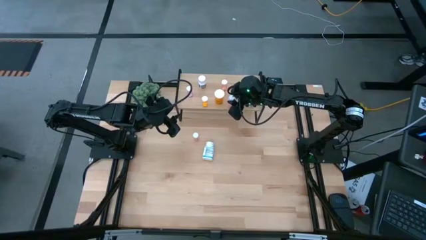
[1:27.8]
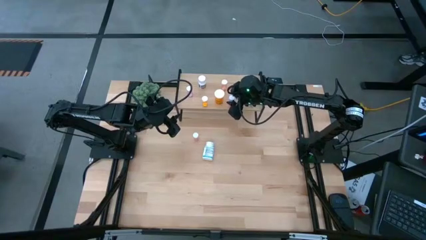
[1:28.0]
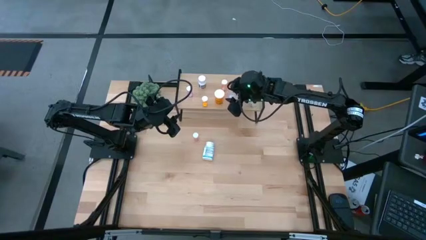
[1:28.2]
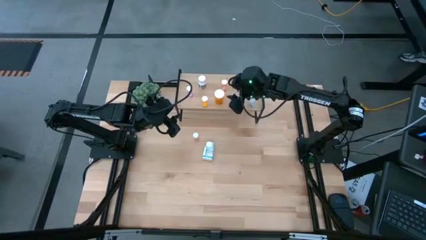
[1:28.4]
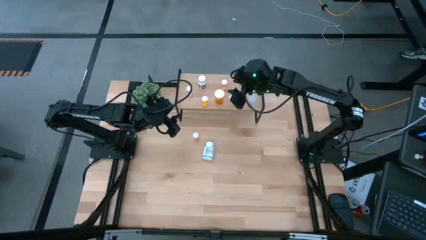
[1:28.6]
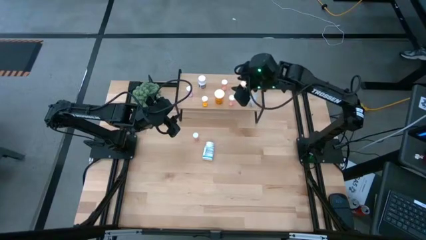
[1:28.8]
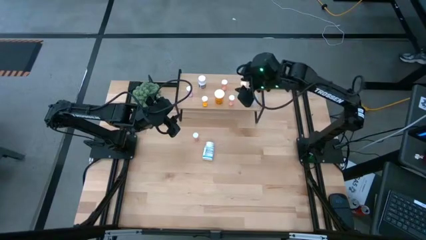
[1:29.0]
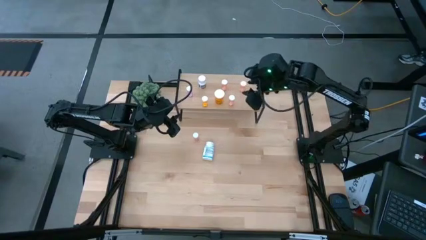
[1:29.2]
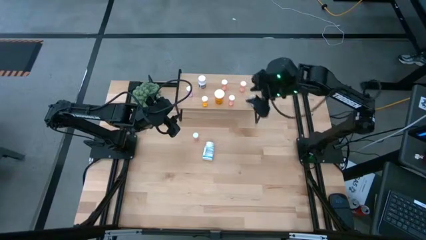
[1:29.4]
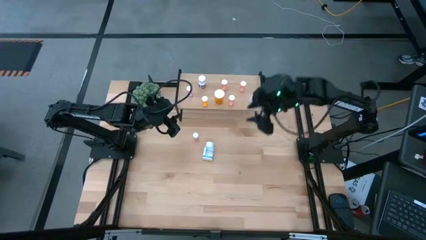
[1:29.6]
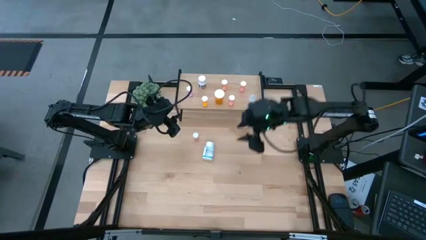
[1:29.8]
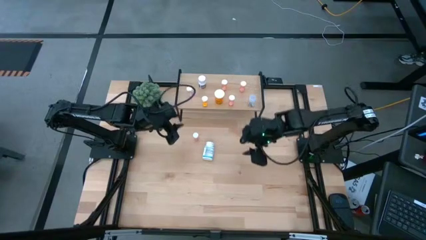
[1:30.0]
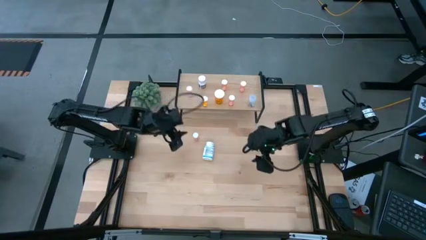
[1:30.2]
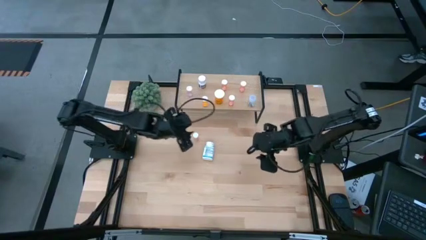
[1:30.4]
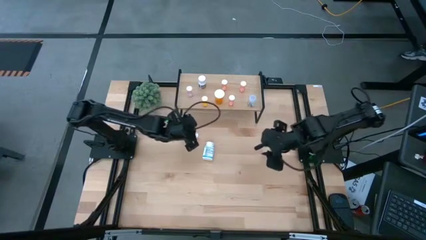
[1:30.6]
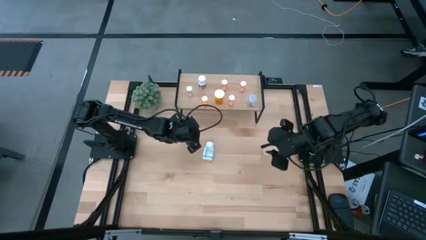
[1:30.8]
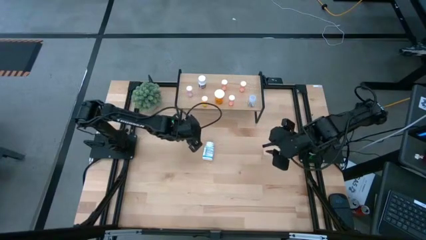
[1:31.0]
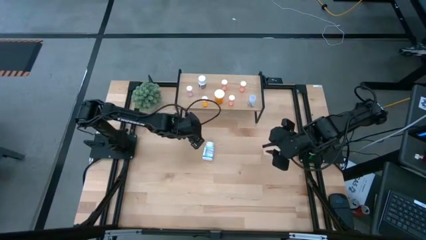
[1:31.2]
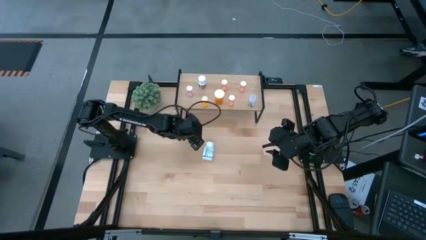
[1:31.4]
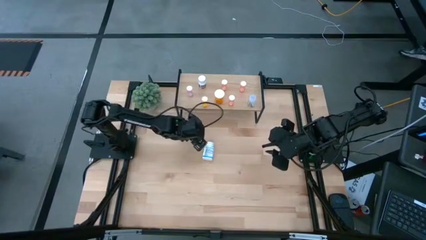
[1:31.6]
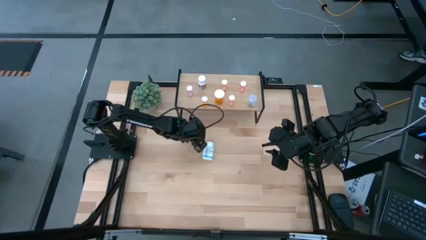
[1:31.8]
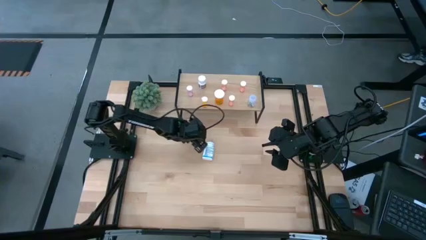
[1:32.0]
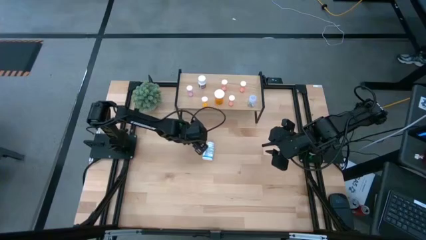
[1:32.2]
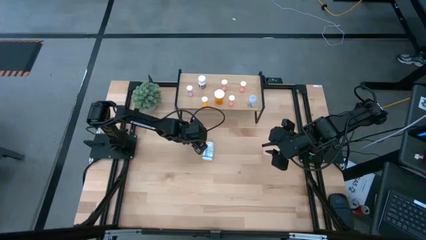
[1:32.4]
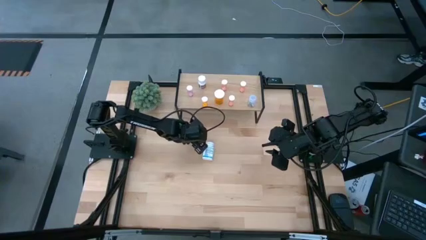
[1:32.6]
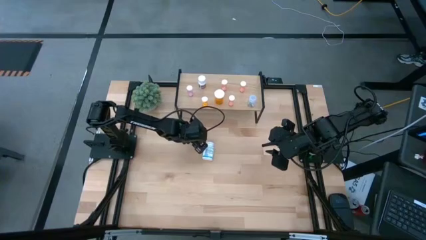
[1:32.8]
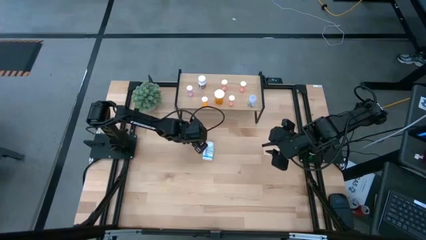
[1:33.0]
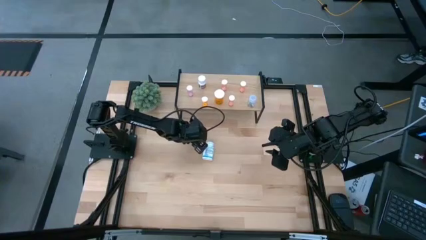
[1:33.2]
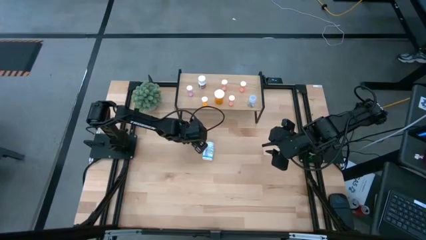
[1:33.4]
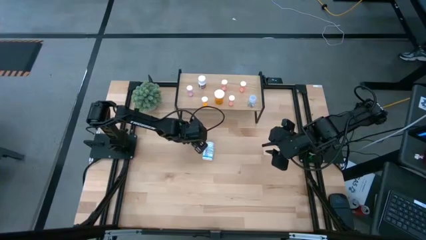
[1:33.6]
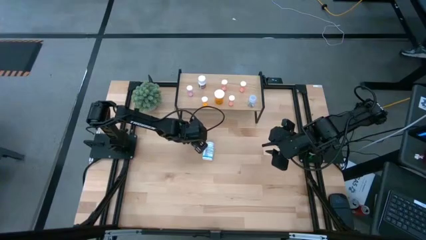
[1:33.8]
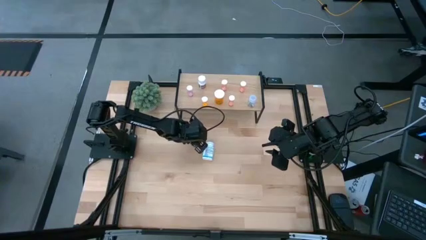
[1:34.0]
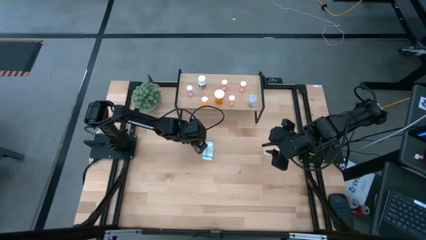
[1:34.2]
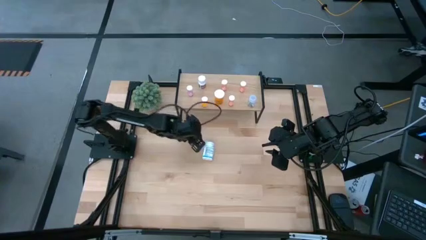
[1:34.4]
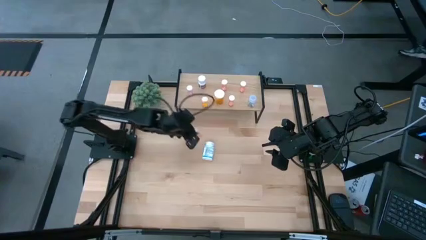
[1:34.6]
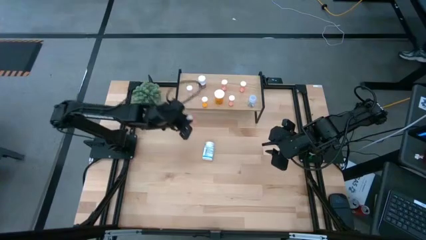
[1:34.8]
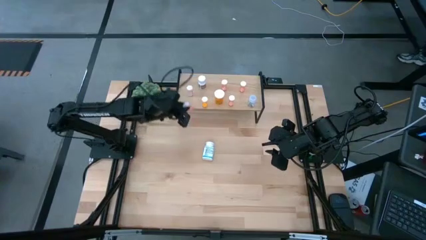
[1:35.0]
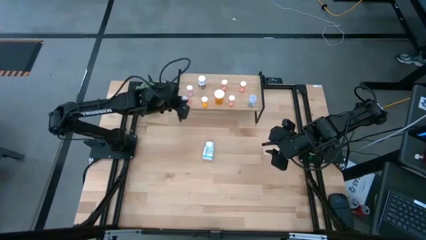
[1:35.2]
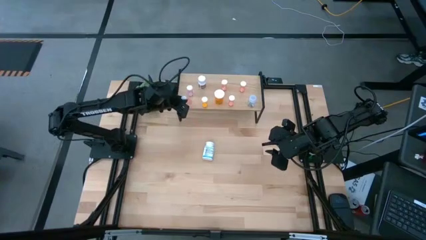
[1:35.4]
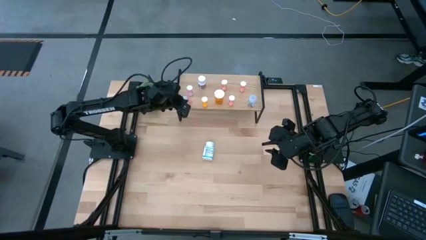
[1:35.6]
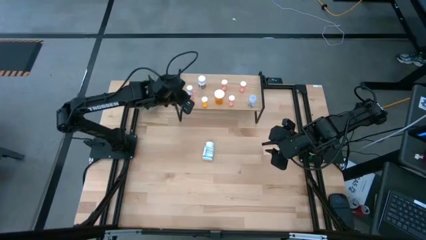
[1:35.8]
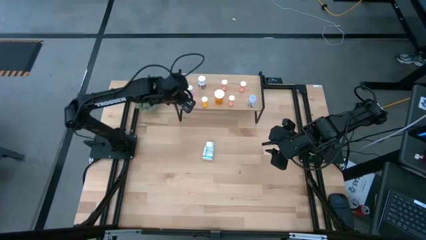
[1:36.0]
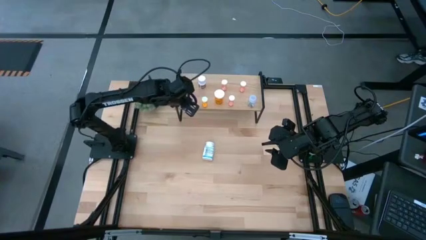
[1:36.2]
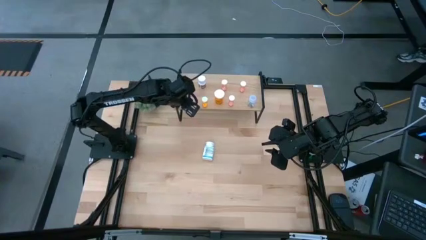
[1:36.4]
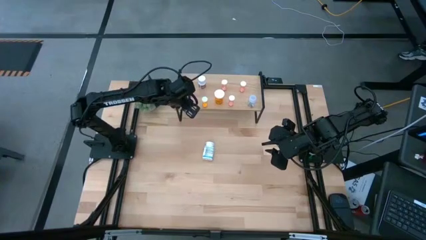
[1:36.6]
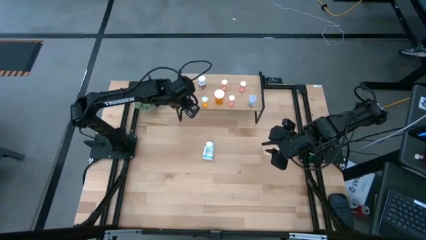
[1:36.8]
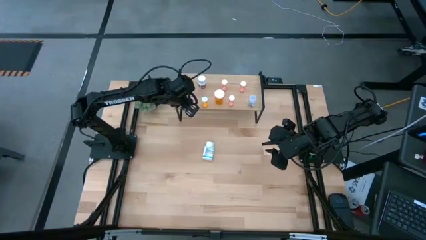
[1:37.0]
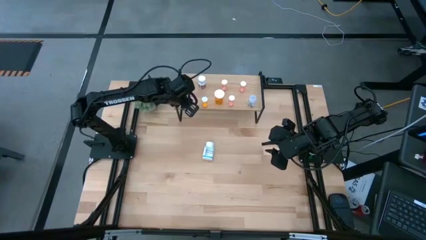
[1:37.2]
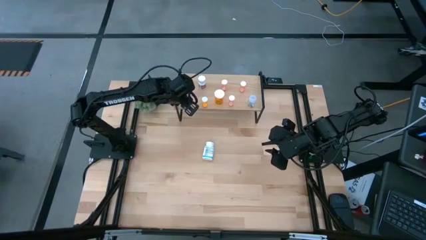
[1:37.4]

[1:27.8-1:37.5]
Task: Pick and place medicine bottles onto shelf by color
Put the pink pill bottle on the shelf

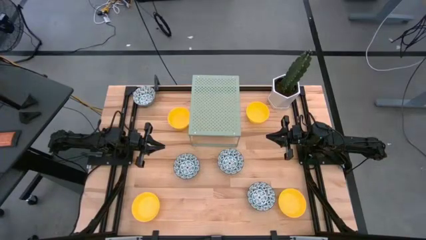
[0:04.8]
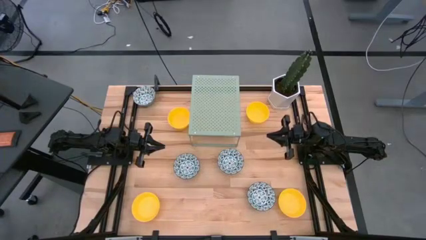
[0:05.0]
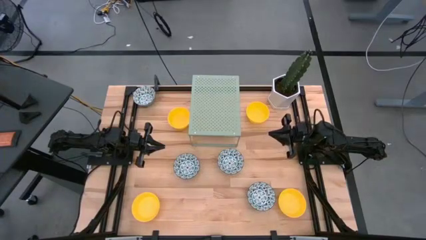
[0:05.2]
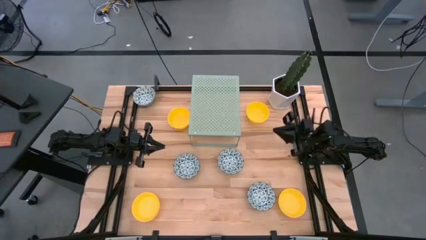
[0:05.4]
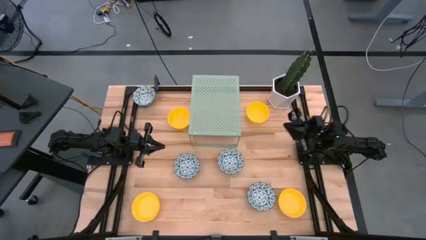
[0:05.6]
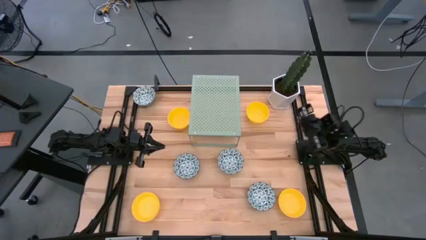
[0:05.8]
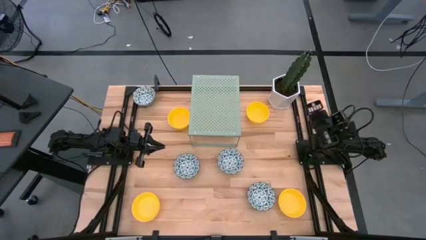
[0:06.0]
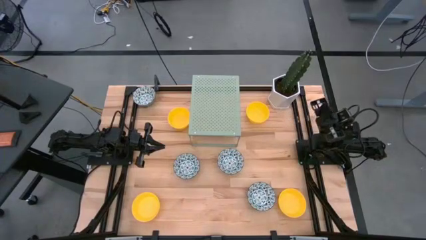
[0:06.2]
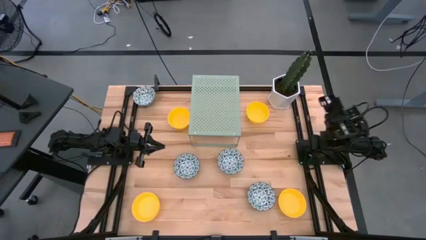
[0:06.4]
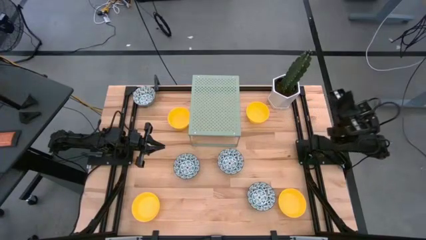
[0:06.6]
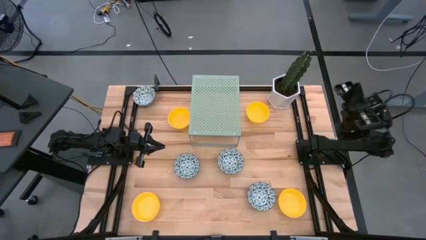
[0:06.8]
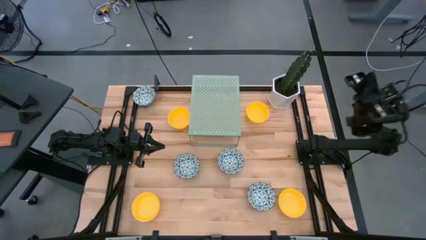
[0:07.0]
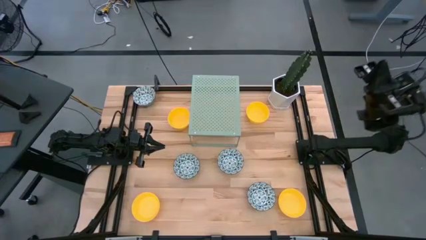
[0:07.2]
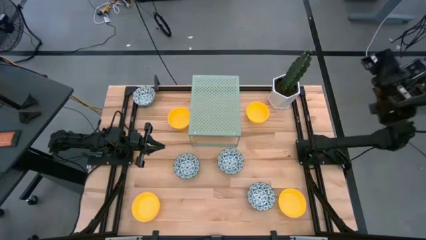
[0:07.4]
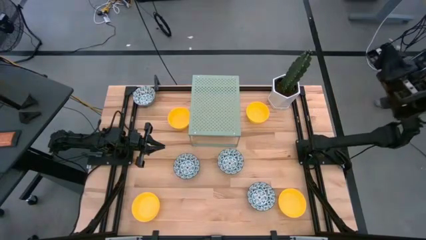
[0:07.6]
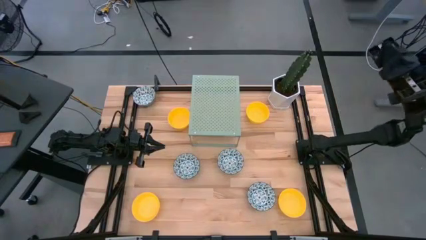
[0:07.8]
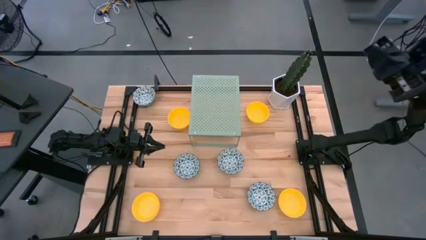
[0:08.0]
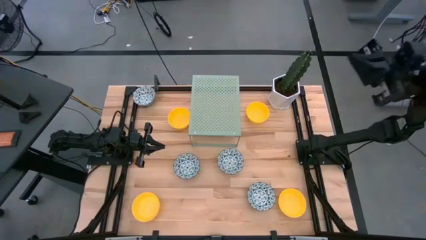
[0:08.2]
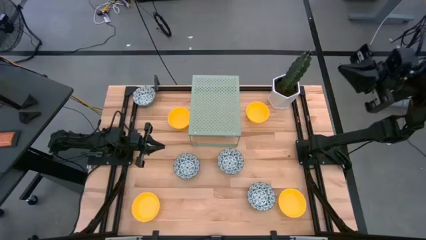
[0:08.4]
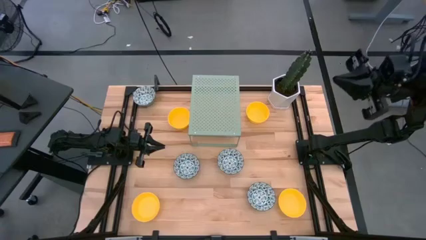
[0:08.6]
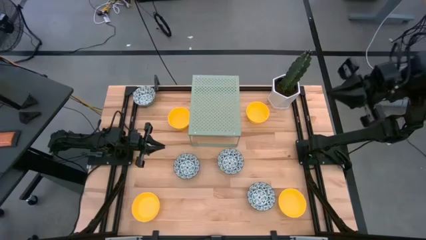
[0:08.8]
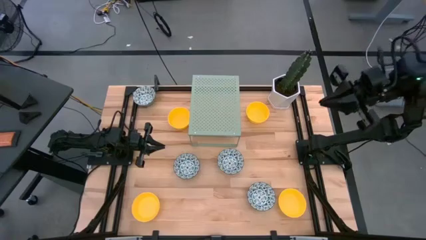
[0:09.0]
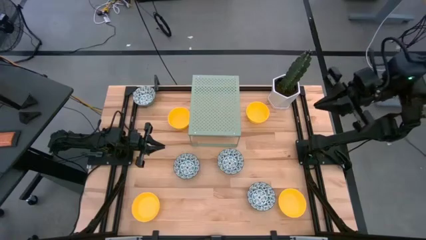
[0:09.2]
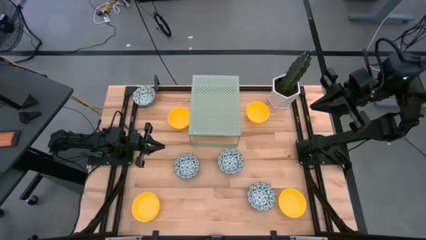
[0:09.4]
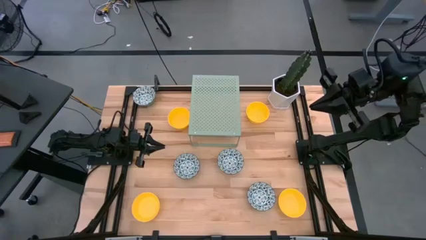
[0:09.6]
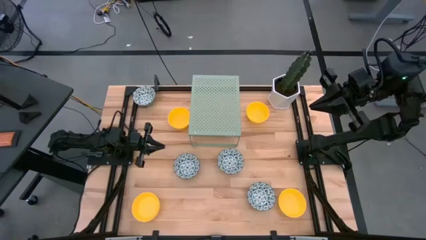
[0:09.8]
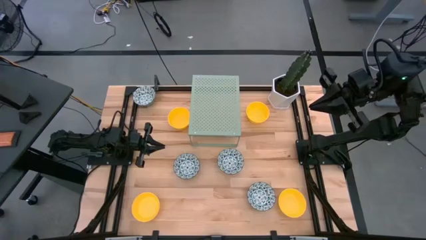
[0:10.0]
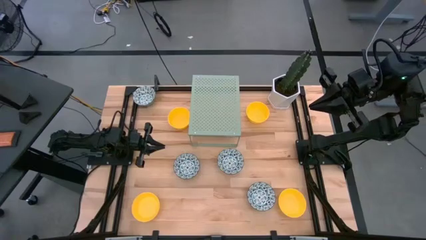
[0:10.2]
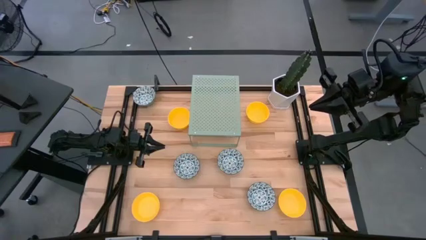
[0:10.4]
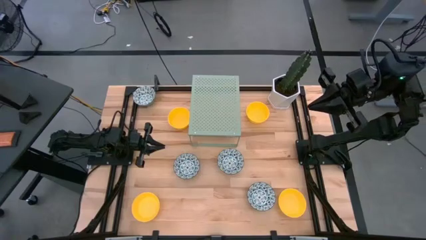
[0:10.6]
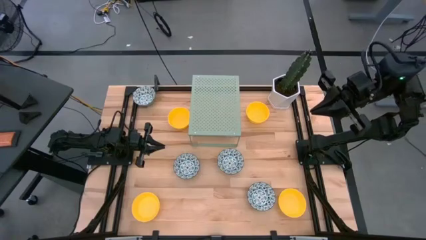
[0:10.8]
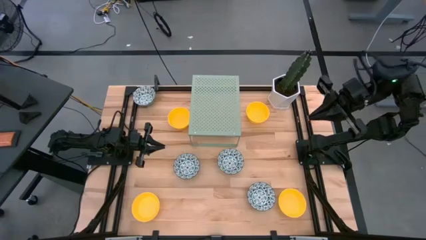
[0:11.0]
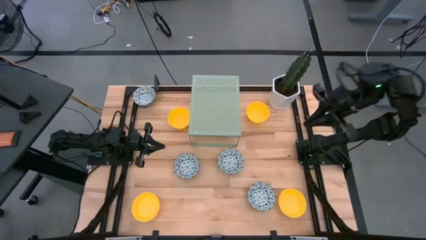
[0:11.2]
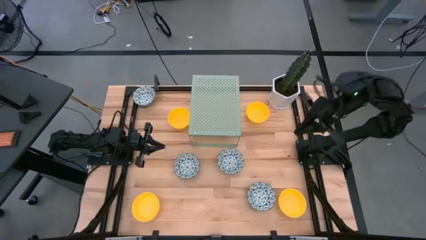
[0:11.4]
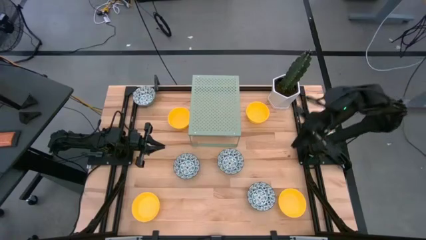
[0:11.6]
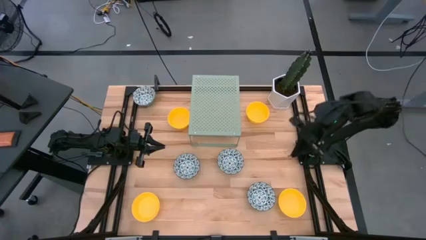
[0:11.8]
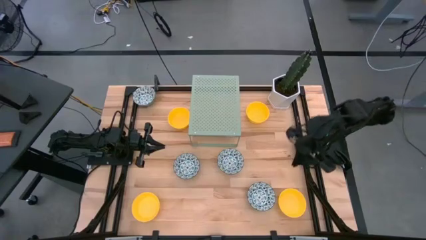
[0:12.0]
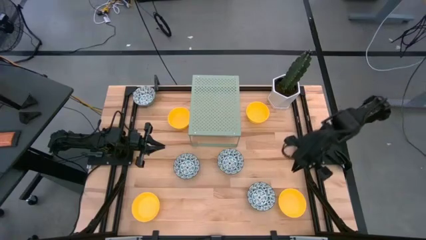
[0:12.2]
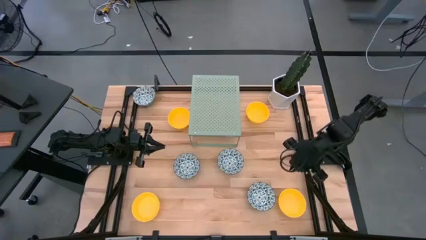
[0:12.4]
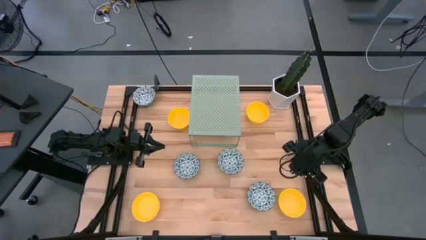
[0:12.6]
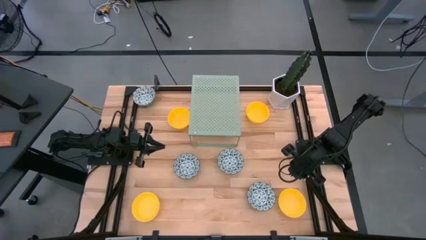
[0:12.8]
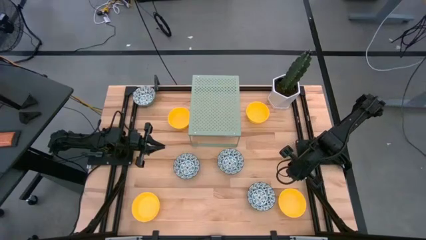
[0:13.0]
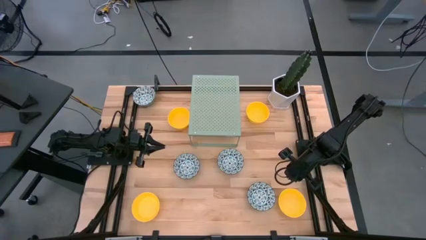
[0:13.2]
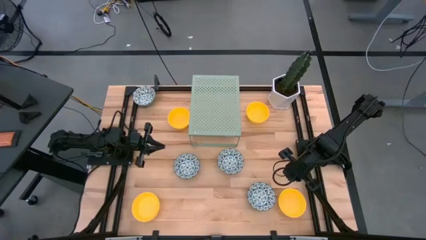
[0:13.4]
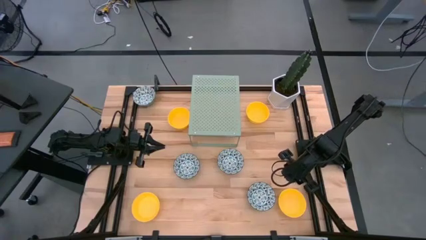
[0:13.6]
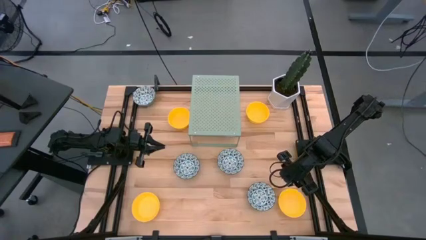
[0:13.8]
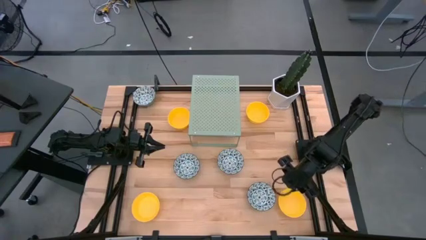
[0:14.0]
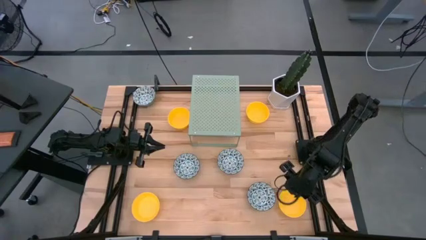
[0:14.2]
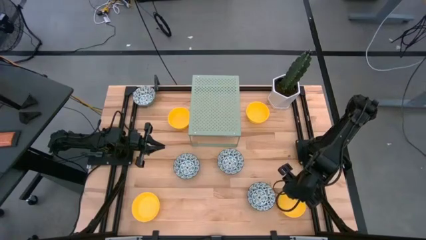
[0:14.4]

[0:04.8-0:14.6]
Task: Pick & Place Mini bowls
Put the yellow bowl on the shelf
